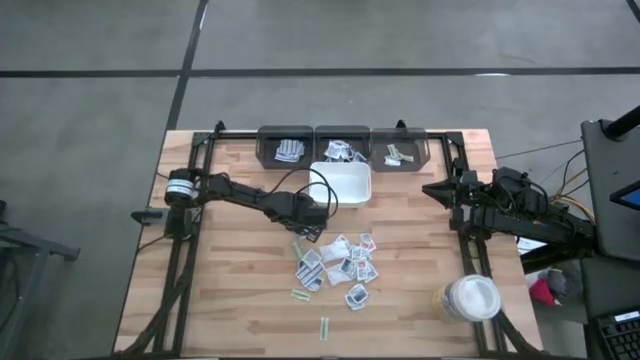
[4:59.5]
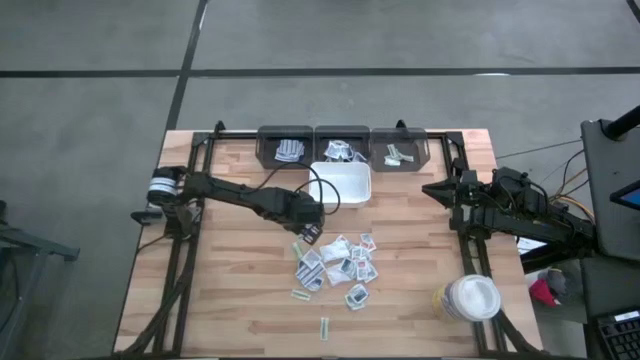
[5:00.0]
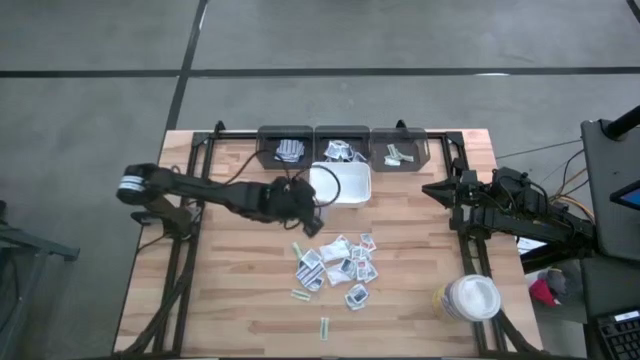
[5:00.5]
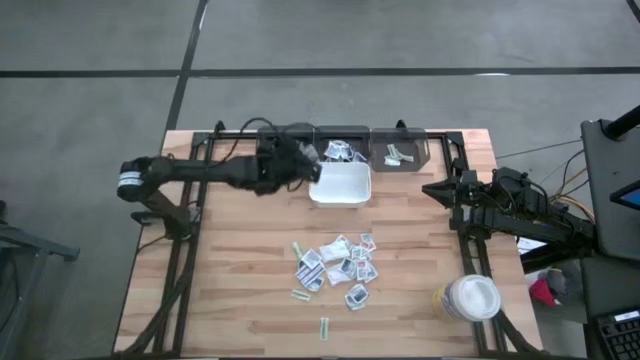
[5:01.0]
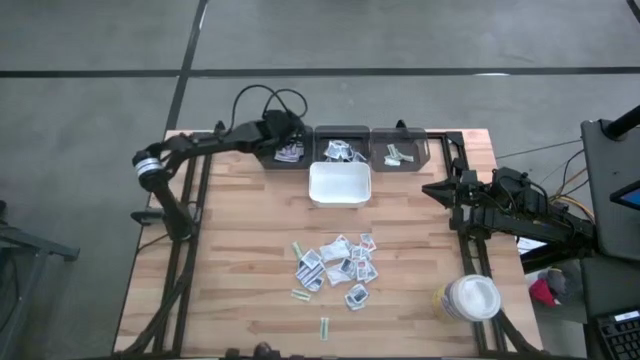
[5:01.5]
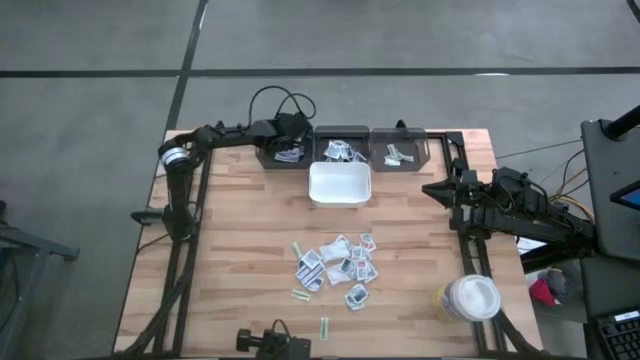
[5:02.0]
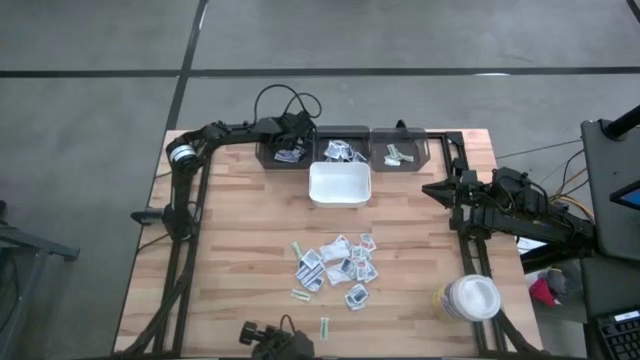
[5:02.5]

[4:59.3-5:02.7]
Task: Pick & Place First Aid Supplies
Put the blue bandage pack into the left gray bin

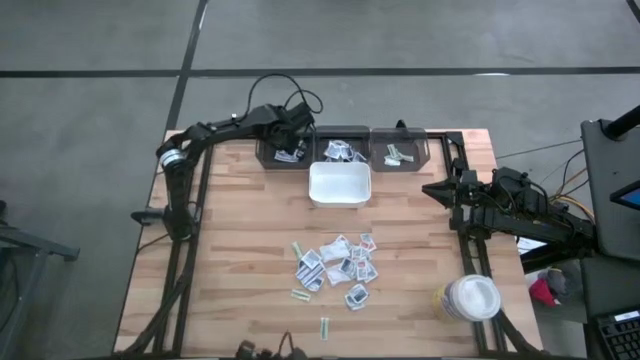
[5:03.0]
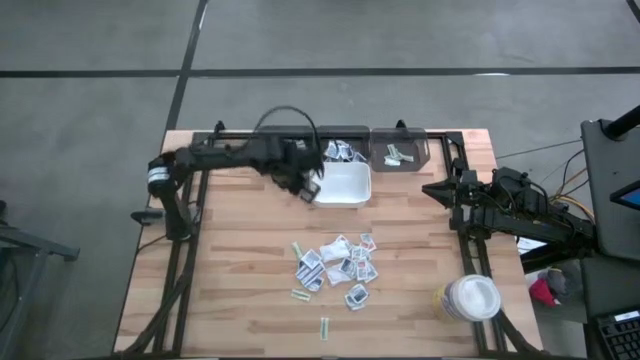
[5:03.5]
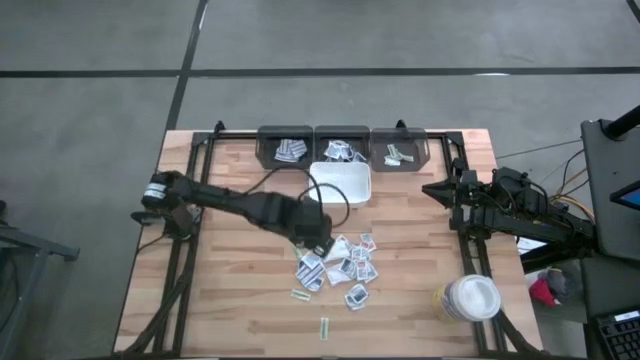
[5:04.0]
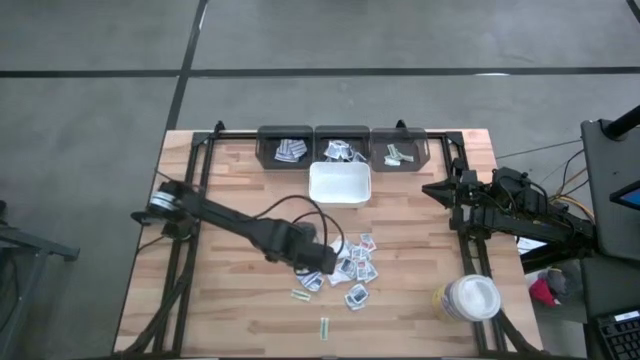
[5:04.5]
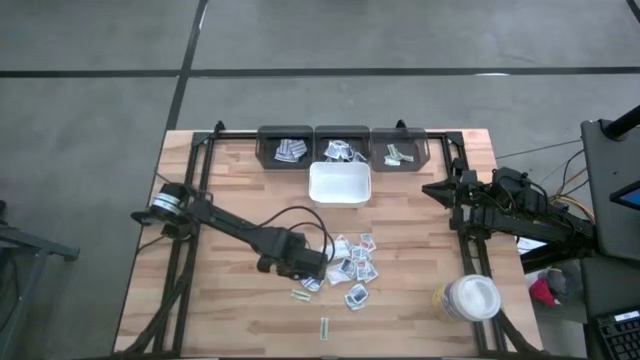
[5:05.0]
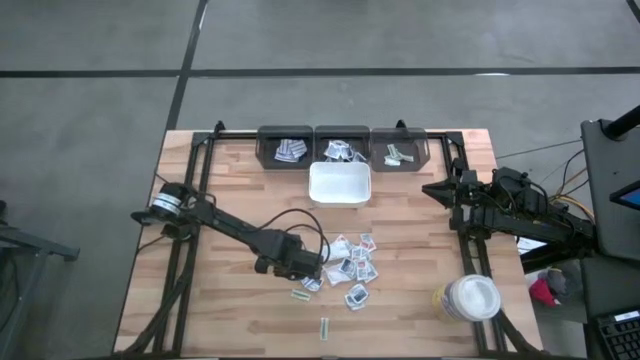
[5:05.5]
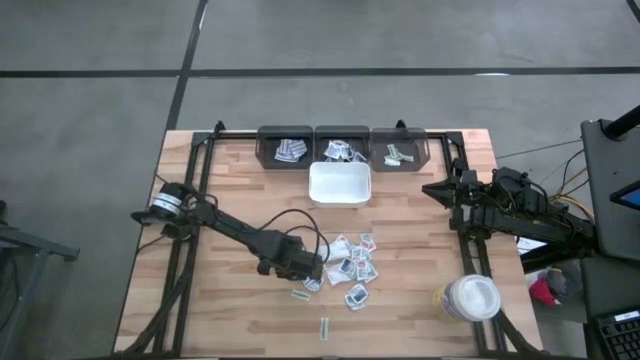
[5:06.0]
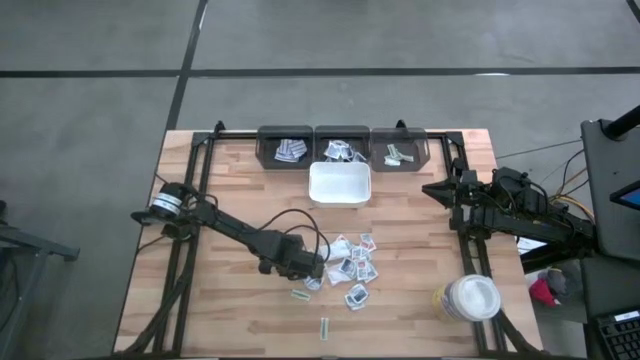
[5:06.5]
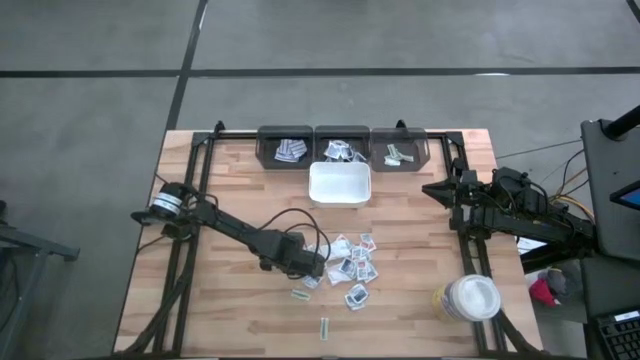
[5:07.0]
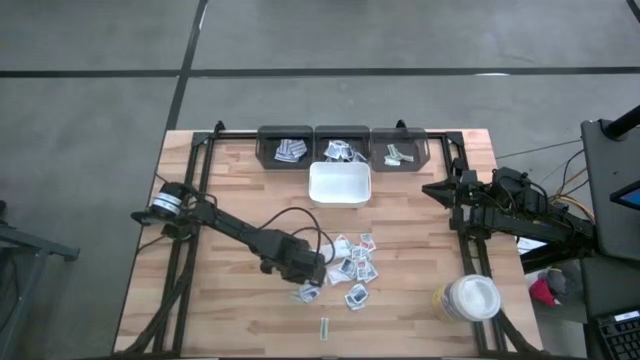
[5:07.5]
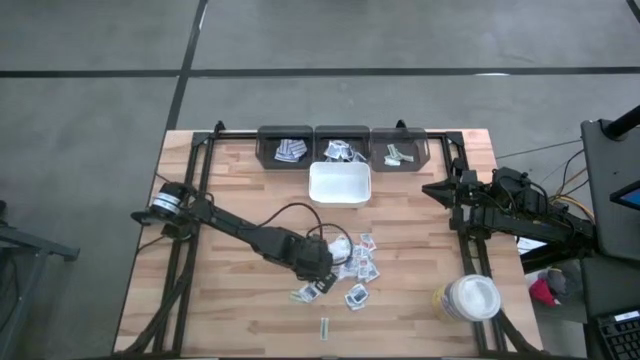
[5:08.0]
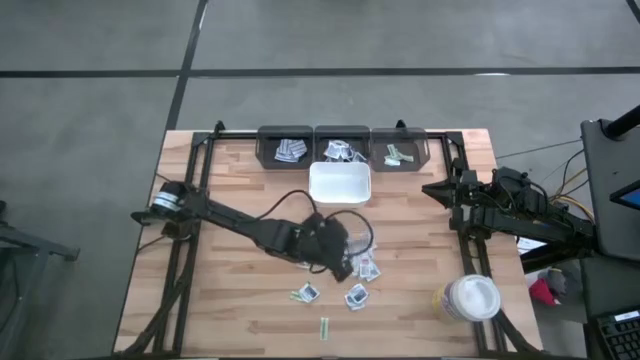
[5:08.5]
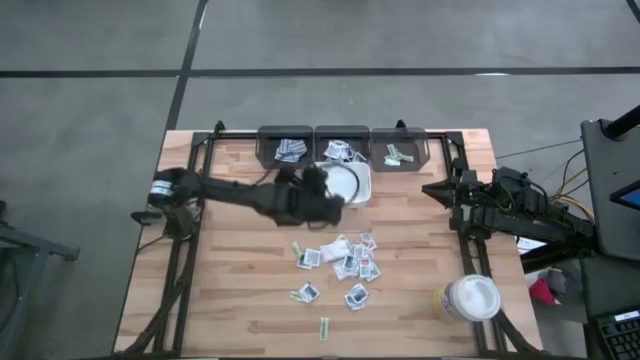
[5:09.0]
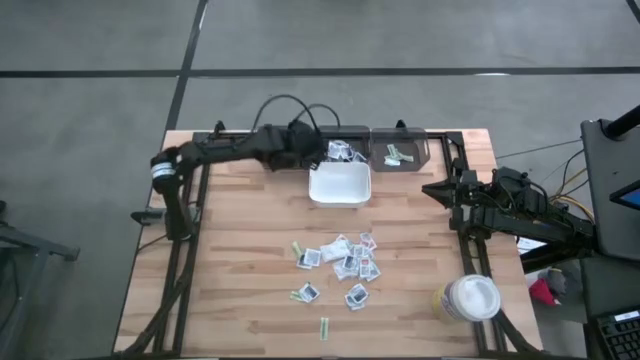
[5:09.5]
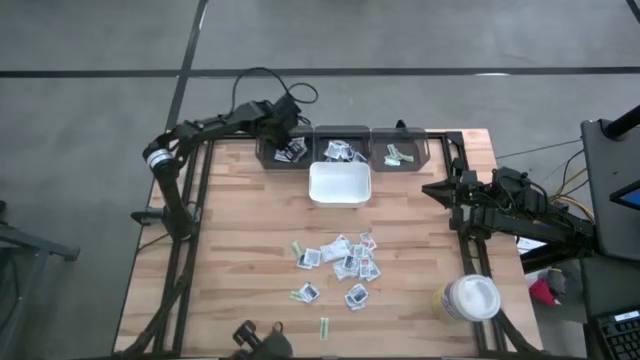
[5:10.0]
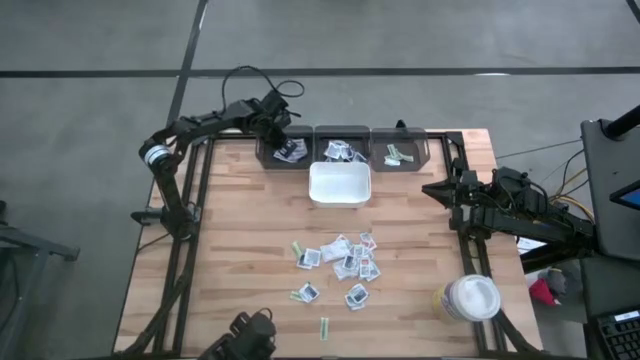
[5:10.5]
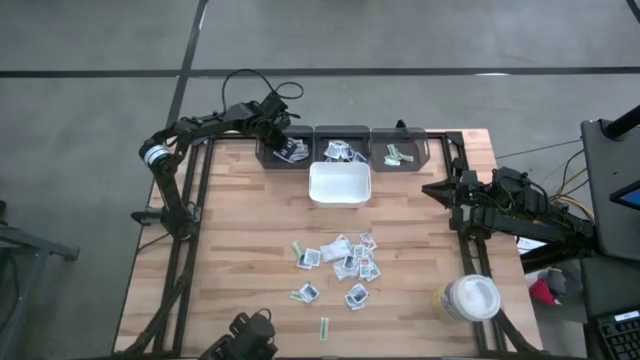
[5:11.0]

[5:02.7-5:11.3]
Put the left blue bandage pack into the left gray bin

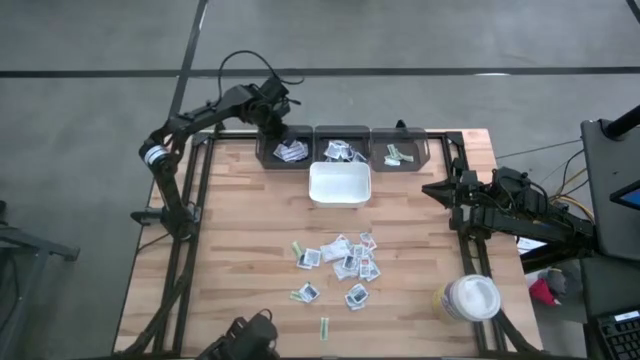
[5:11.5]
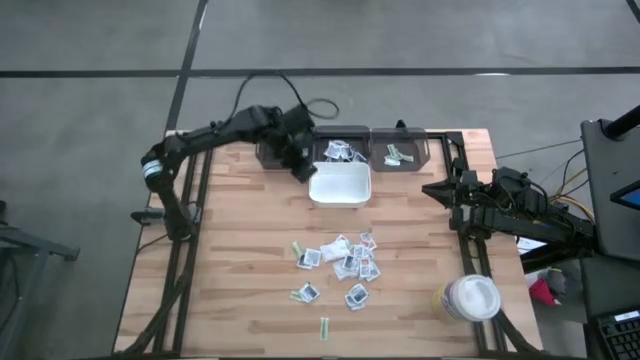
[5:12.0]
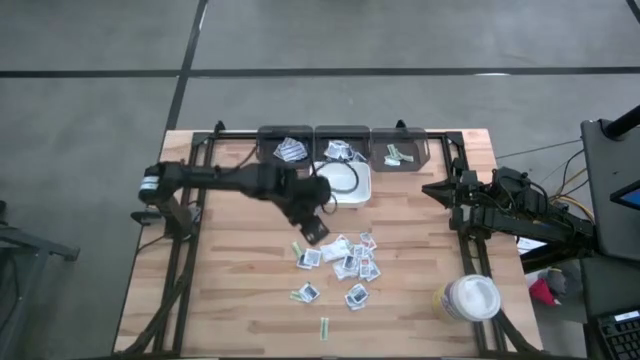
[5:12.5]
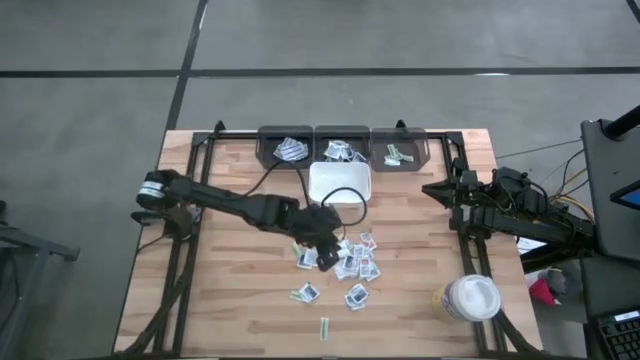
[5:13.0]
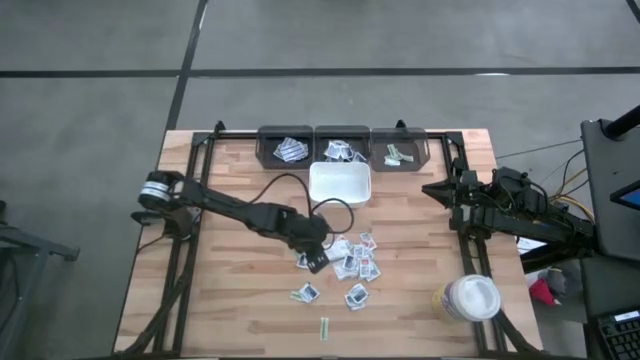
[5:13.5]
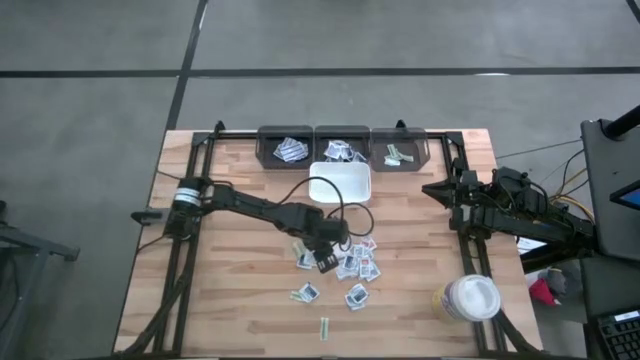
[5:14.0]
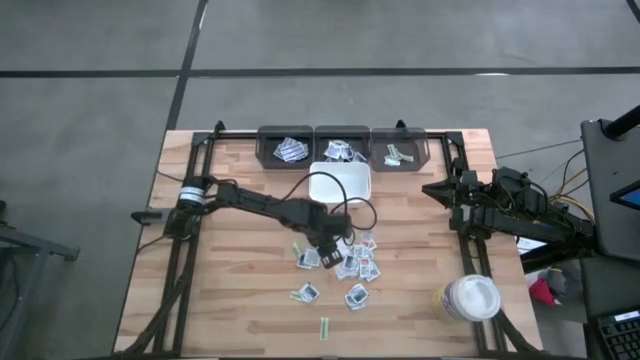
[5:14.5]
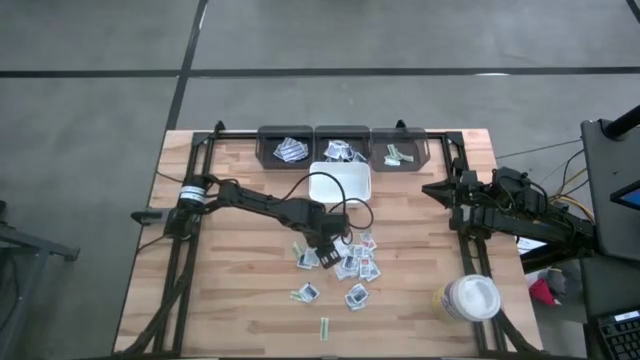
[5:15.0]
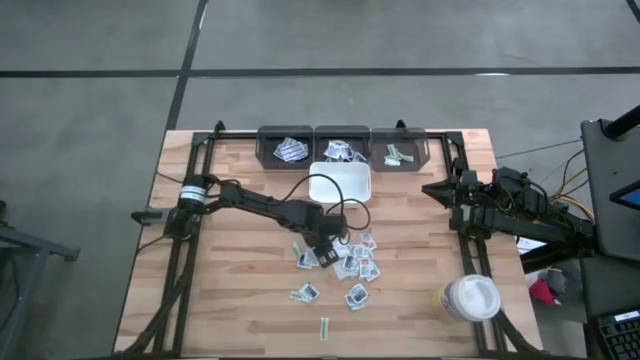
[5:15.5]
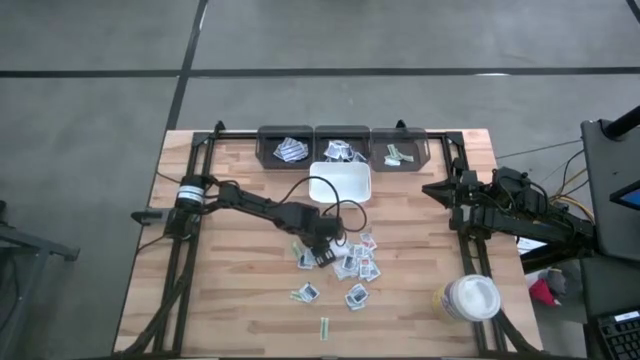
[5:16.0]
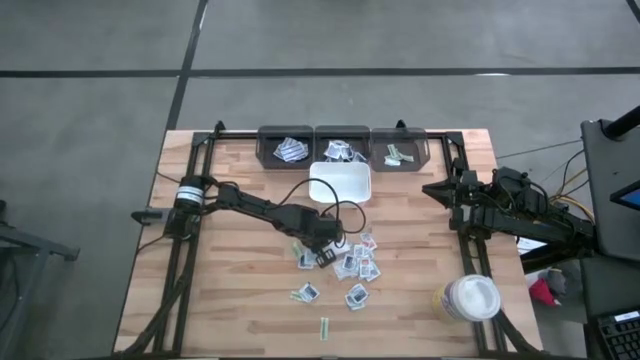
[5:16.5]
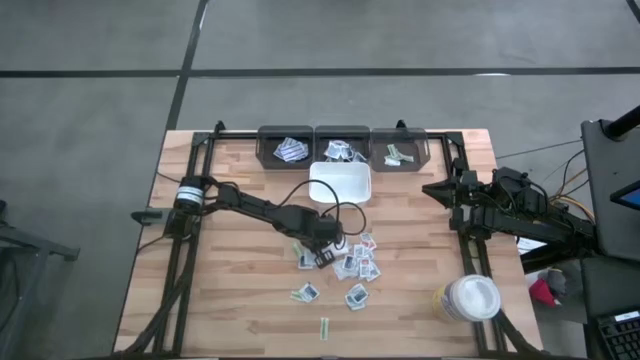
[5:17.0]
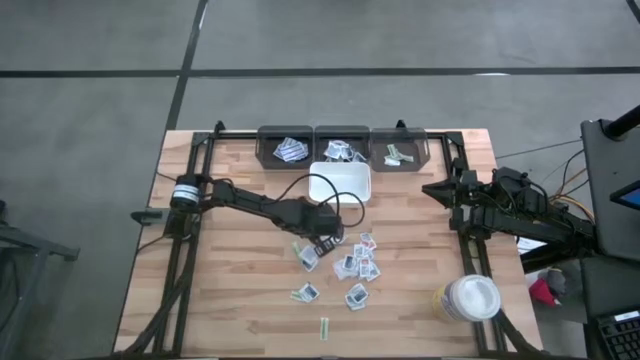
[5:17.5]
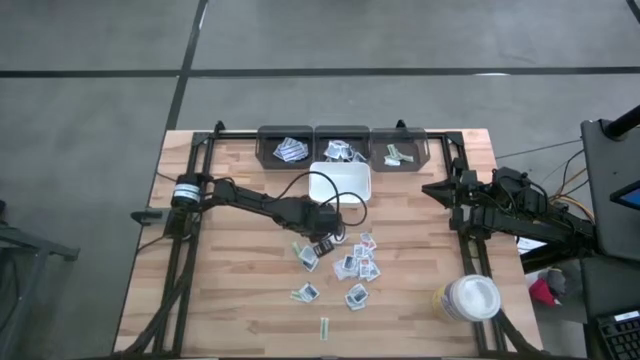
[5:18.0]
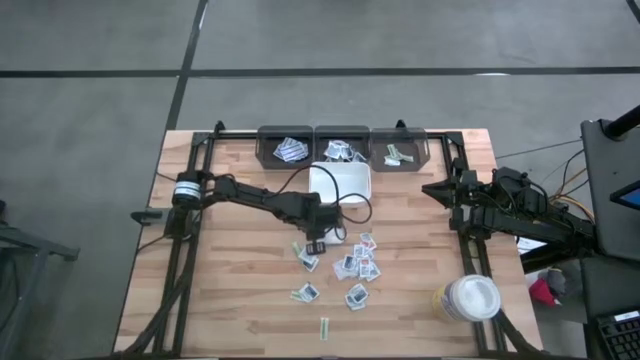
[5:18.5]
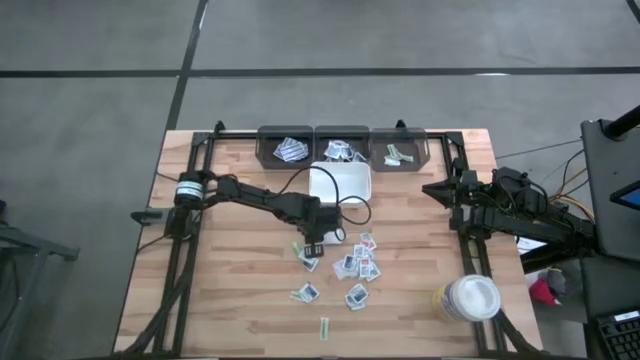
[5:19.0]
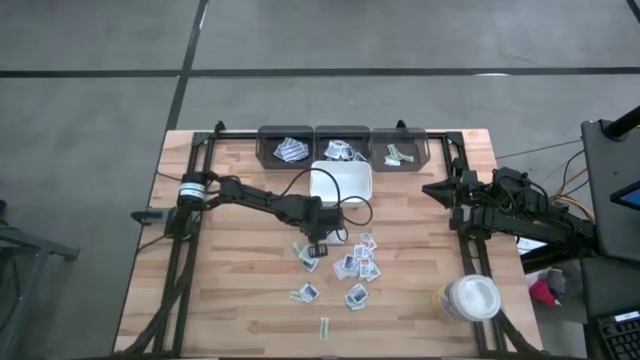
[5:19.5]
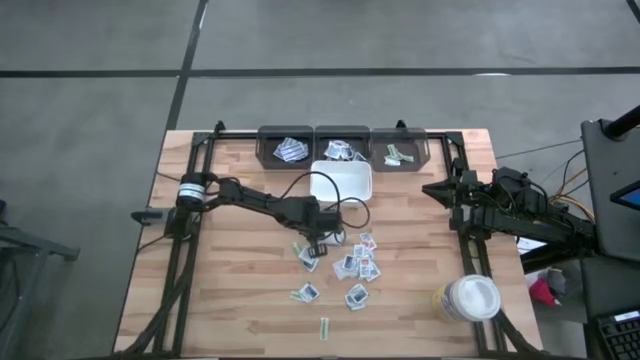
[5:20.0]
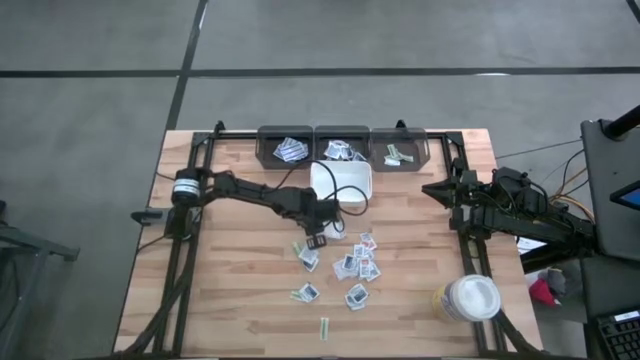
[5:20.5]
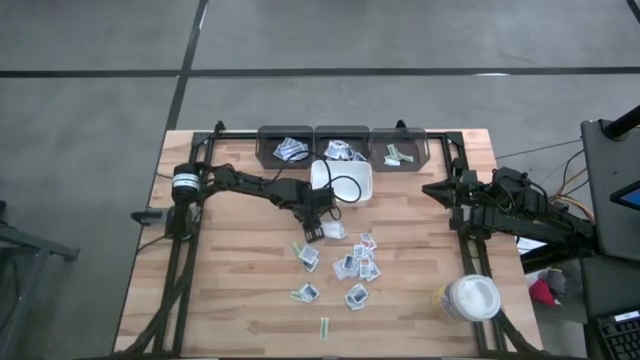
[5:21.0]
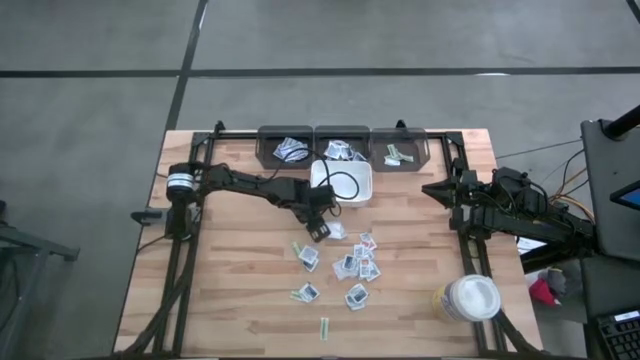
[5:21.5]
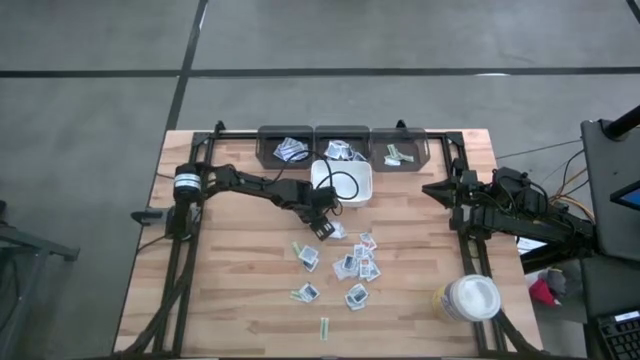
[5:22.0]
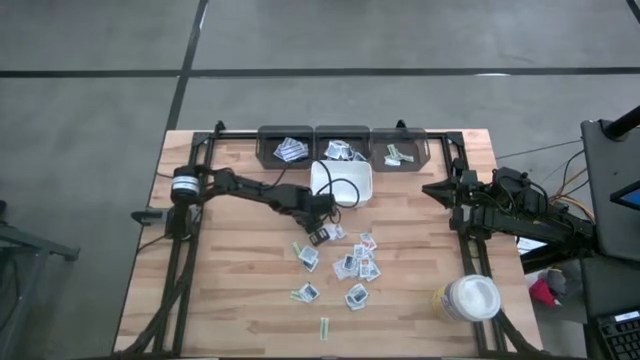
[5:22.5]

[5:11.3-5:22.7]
Put the top blue bandage pack into the left gray bin
